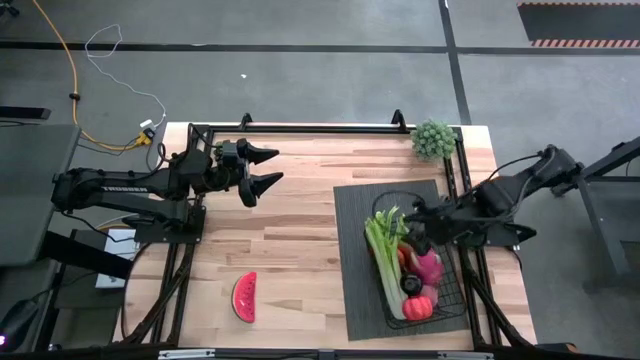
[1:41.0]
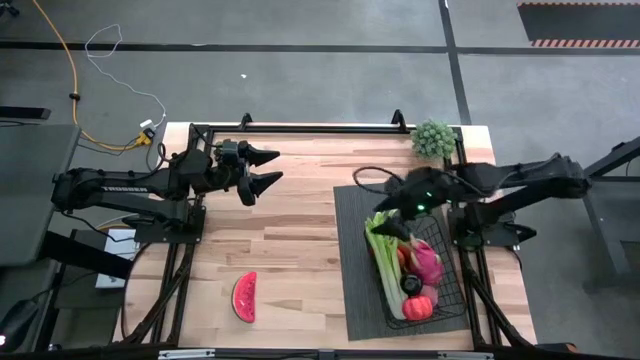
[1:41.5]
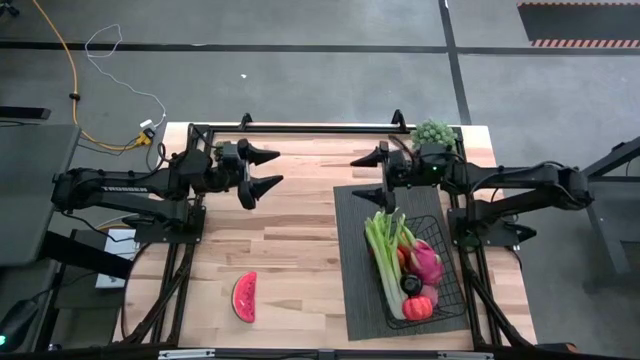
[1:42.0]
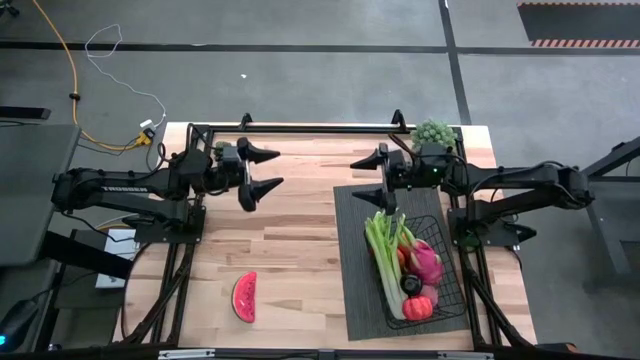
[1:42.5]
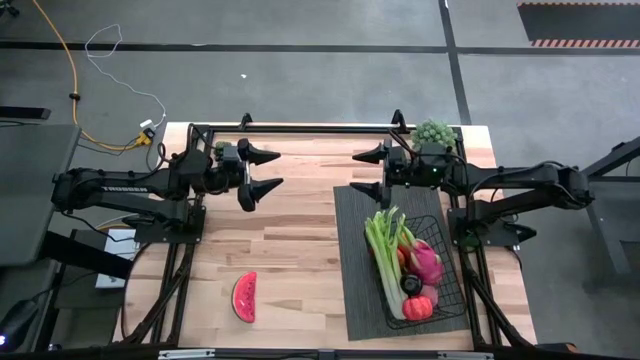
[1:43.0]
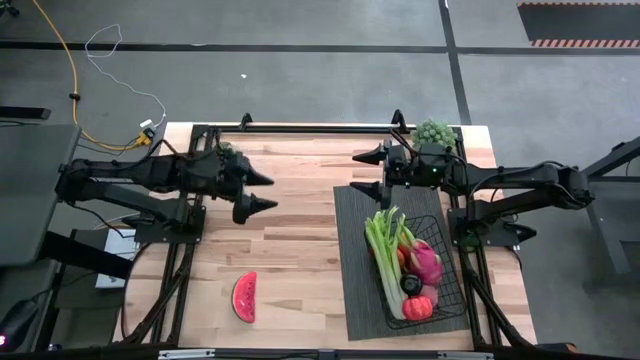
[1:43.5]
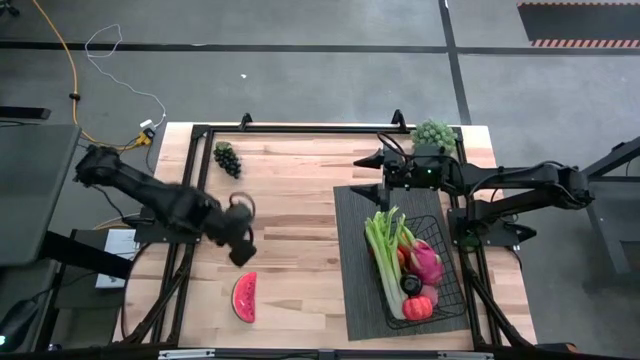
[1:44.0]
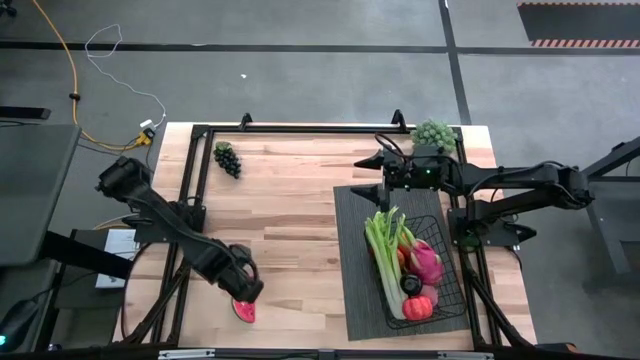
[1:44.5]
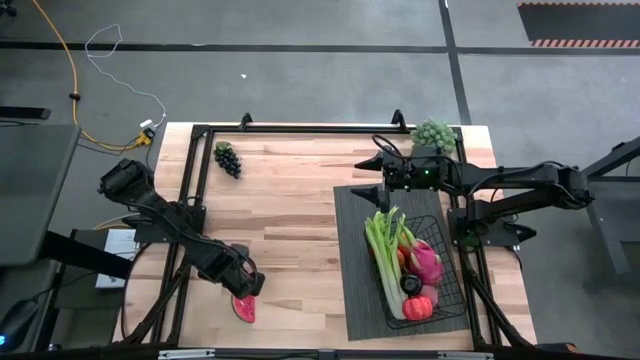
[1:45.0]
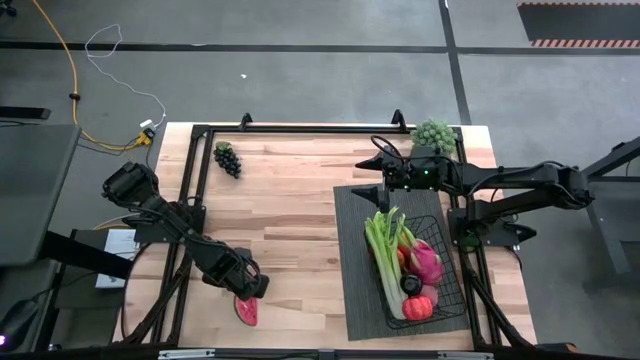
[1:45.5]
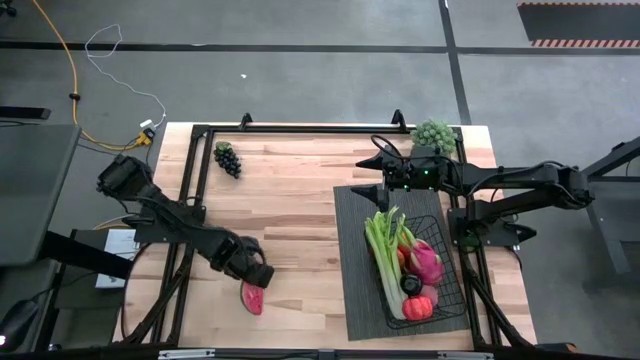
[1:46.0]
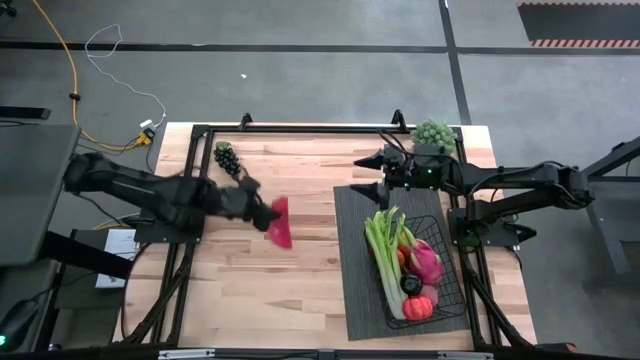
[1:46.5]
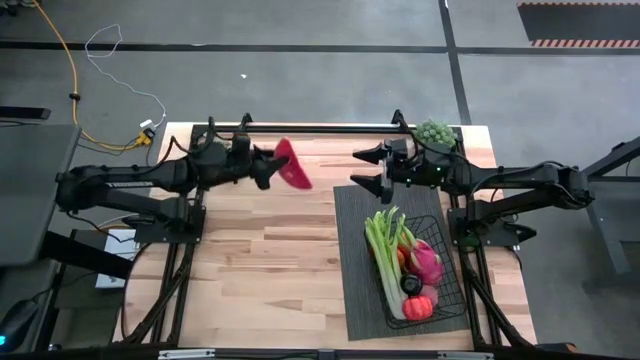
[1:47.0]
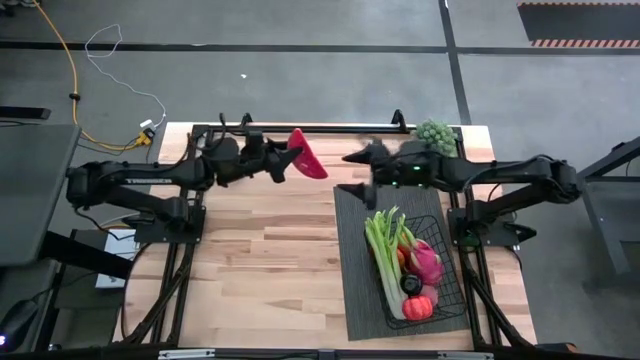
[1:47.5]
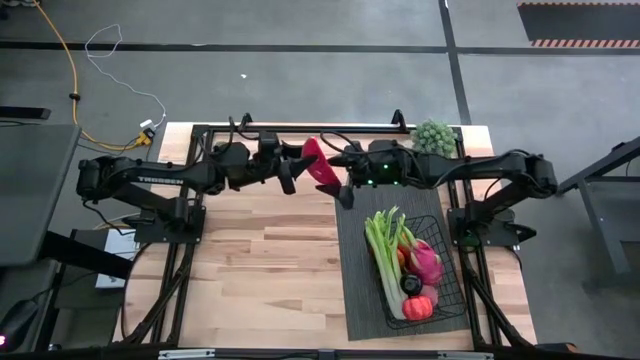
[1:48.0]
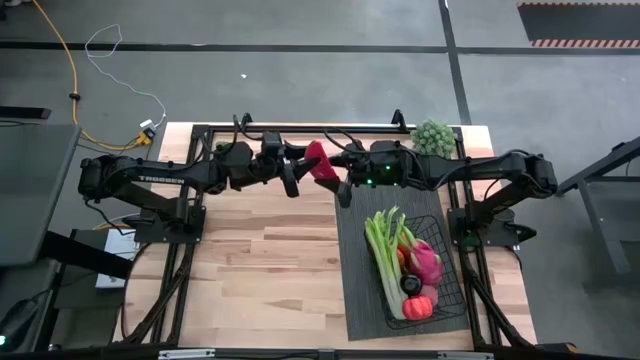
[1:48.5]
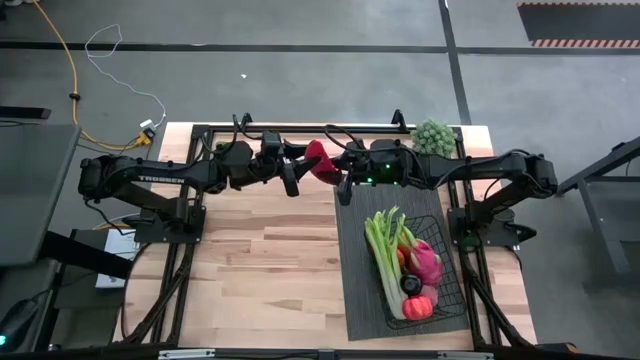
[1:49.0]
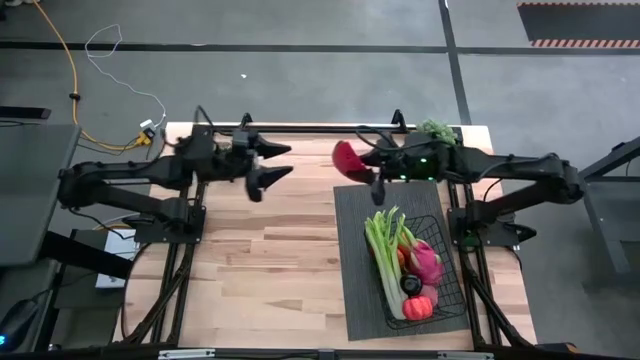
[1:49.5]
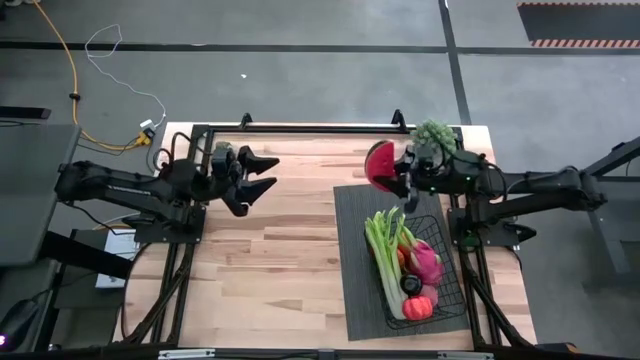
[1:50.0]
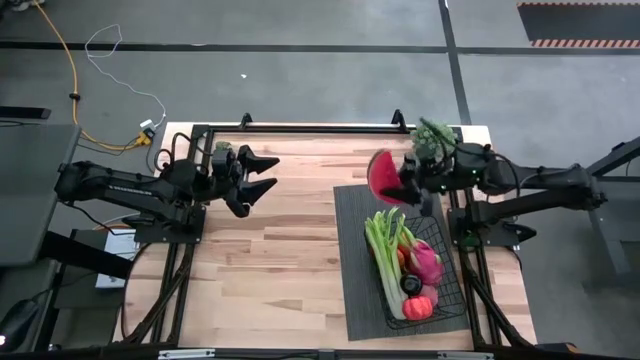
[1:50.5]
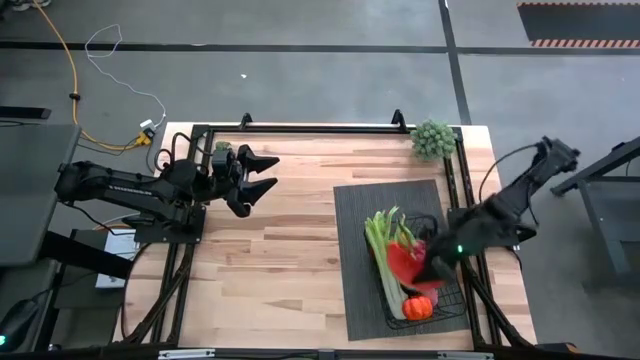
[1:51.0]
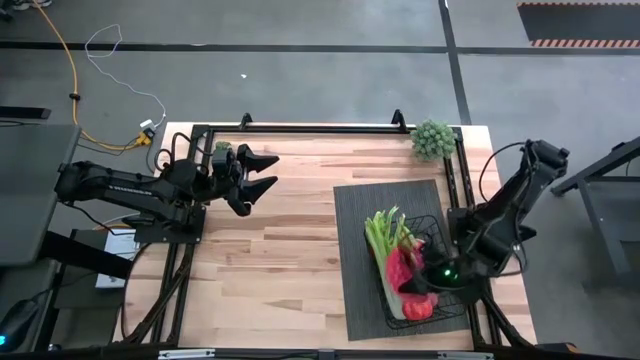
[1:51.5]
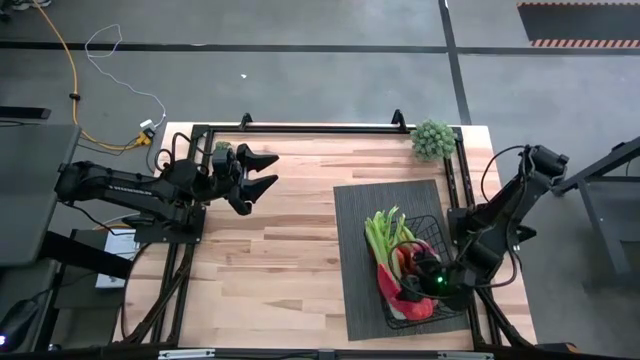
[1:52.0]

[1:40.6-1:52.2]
Task: Build produce basket
Put the watermelon into the black wire basket

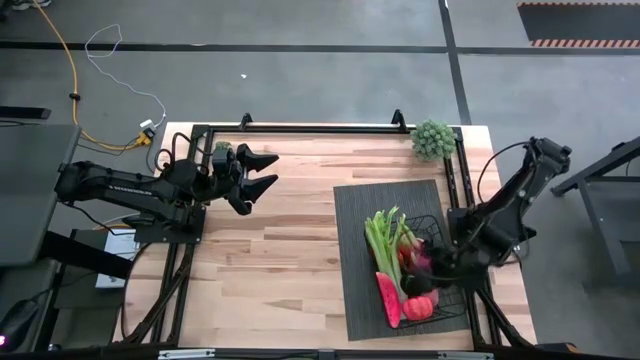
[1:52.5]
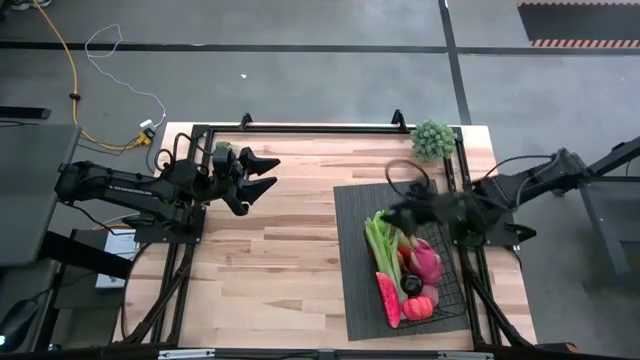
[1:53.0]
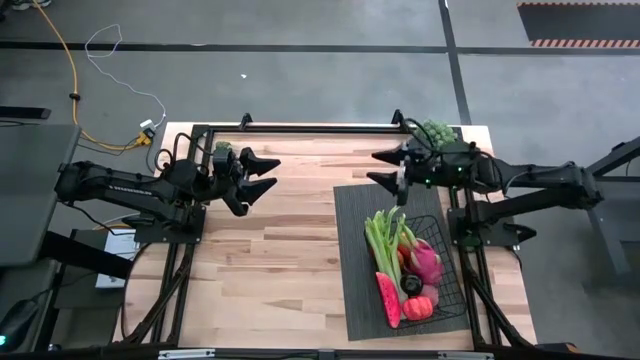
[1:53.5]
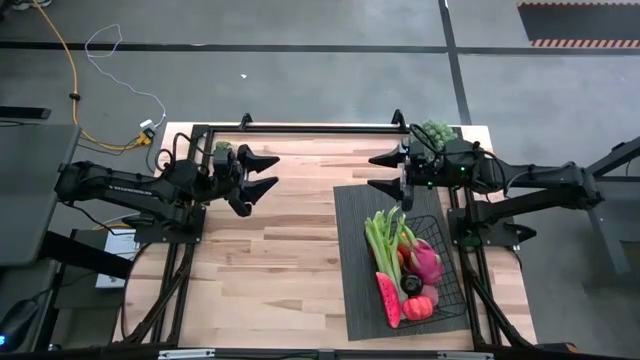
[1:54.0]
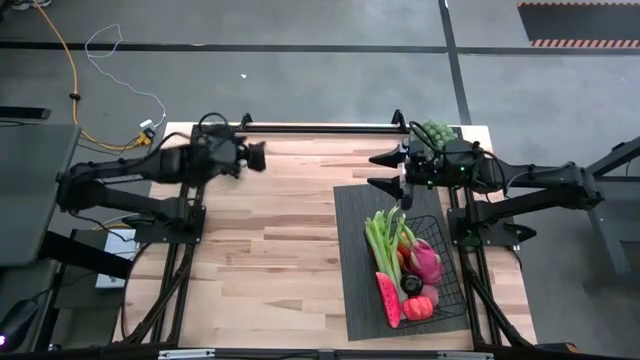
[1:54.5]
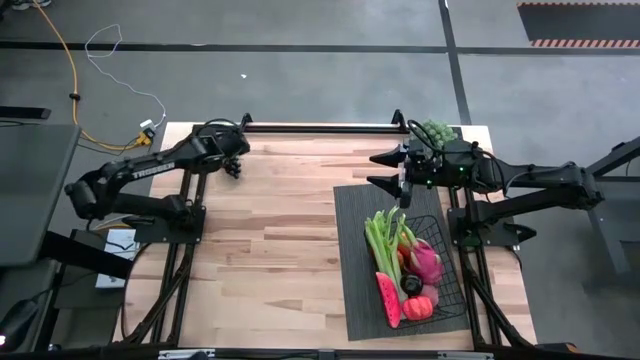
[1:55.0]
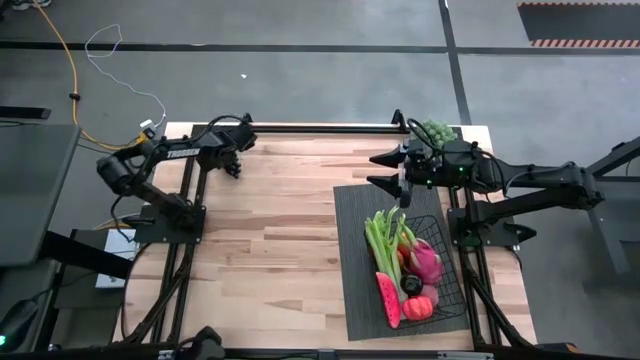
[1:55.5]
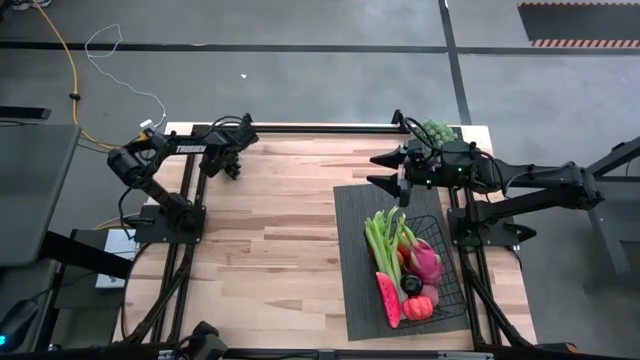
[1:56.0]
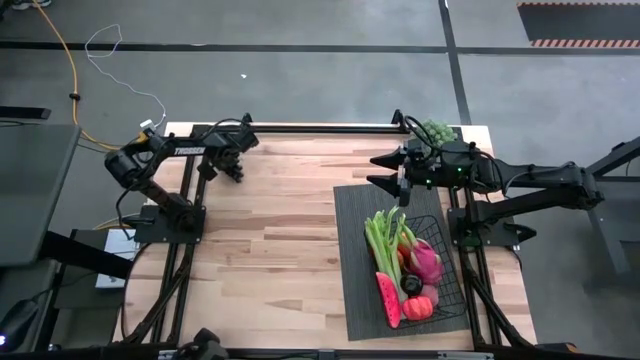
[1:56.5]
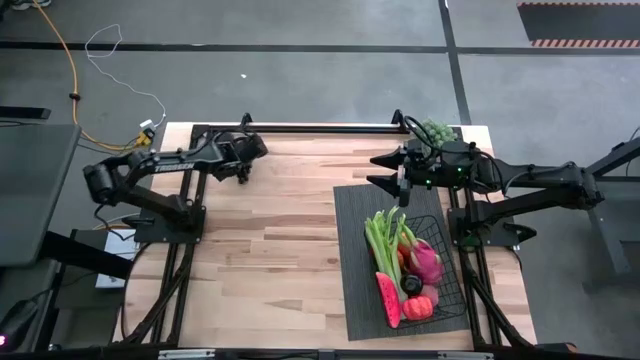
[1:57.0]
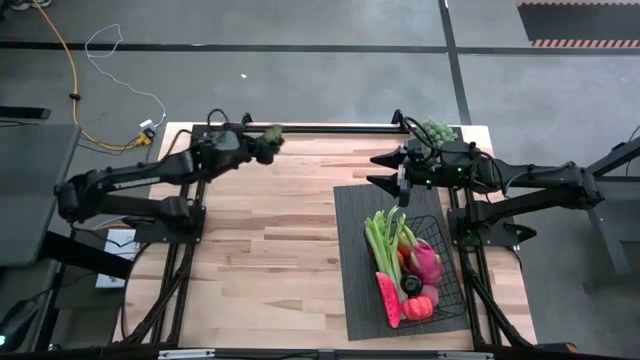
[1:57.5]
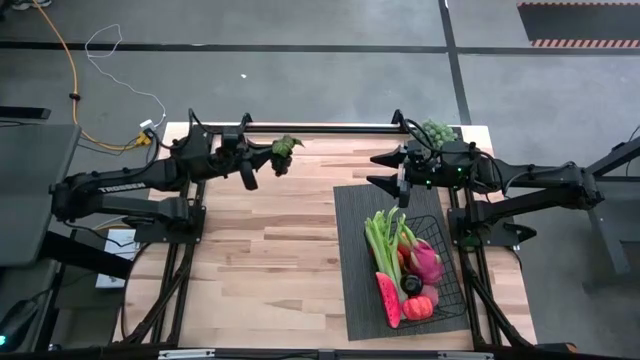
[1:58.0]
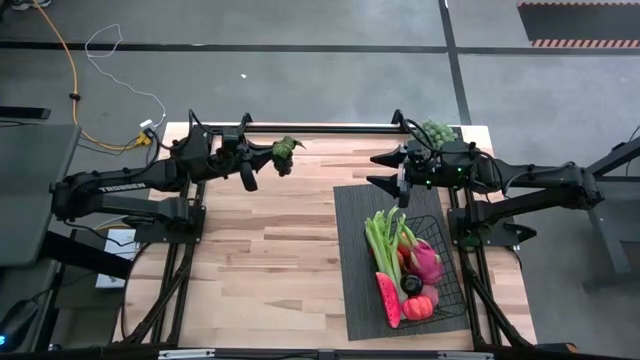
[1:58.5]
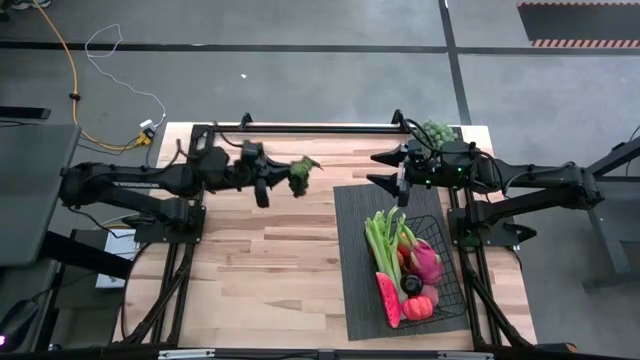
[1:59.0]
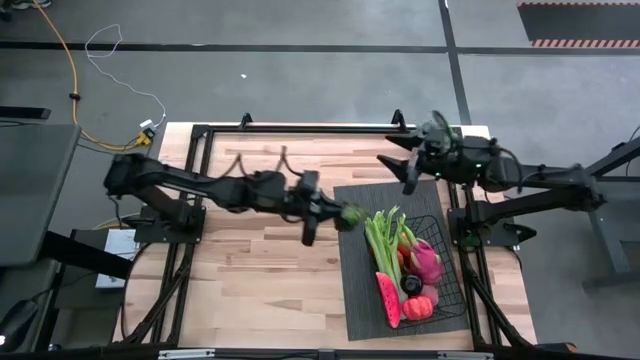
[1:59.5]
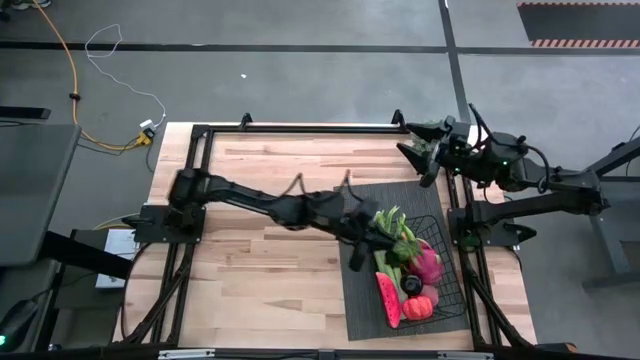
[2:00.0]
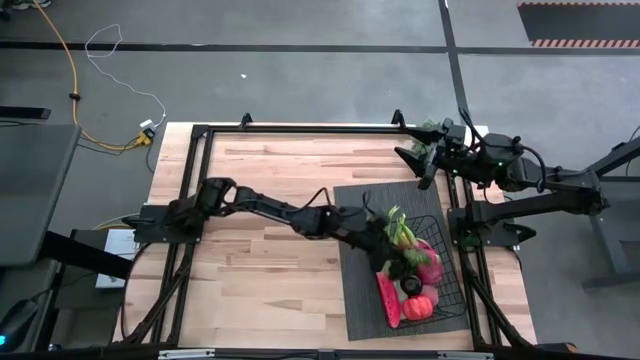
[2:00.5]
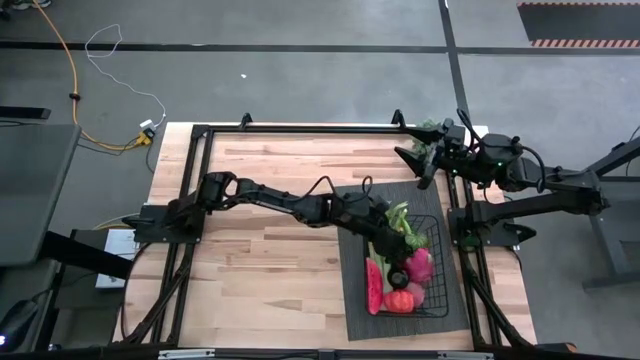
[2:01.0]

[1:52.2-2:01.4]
Put the bunch of grapes into the black wire basket
